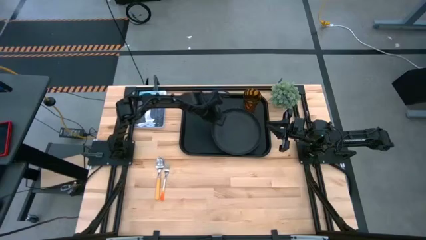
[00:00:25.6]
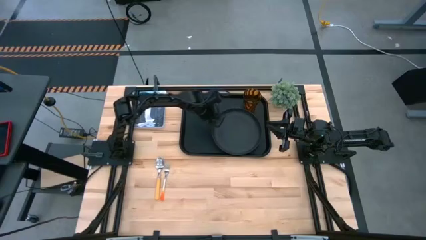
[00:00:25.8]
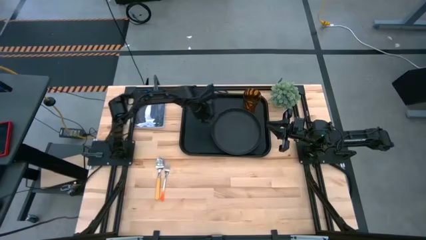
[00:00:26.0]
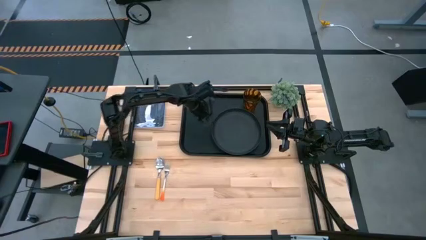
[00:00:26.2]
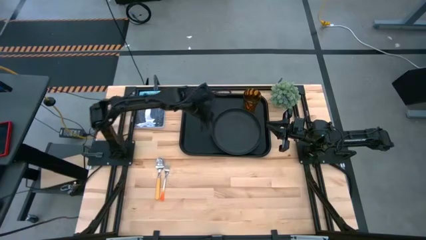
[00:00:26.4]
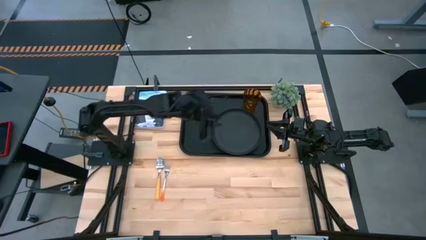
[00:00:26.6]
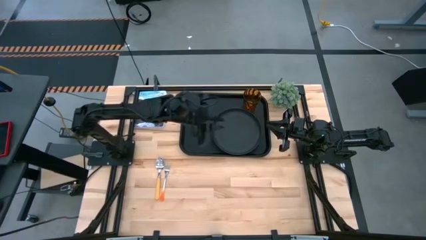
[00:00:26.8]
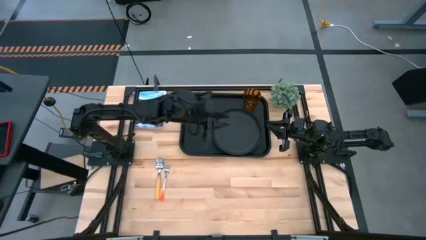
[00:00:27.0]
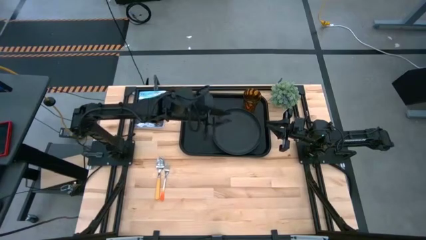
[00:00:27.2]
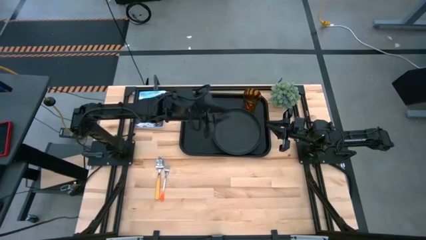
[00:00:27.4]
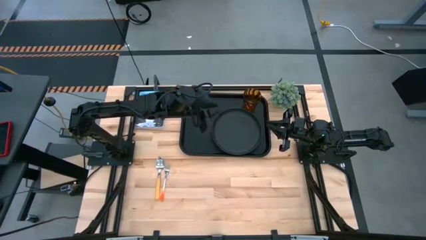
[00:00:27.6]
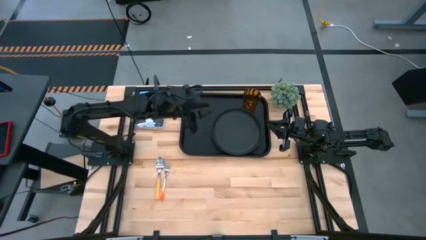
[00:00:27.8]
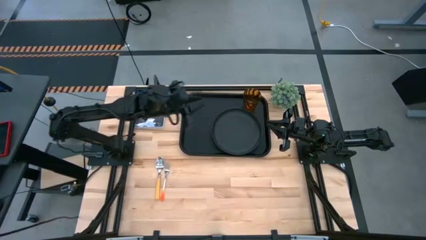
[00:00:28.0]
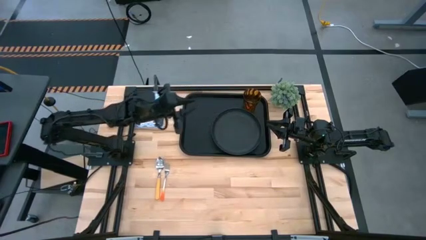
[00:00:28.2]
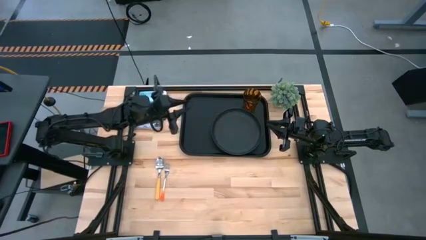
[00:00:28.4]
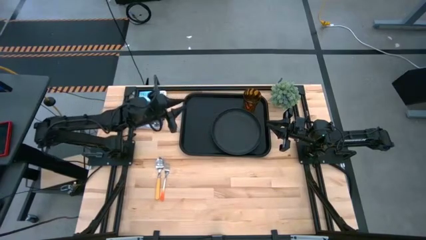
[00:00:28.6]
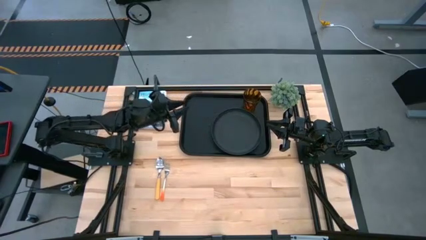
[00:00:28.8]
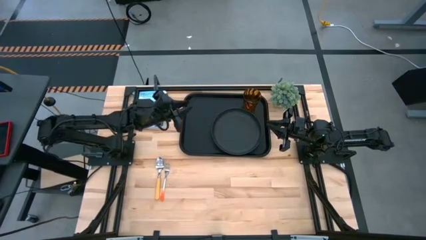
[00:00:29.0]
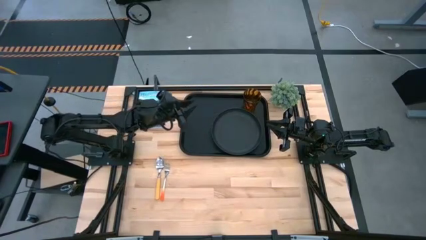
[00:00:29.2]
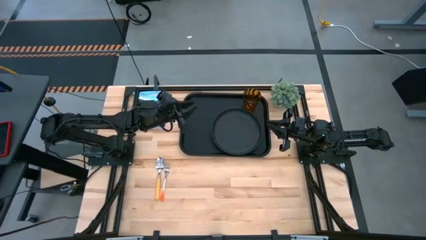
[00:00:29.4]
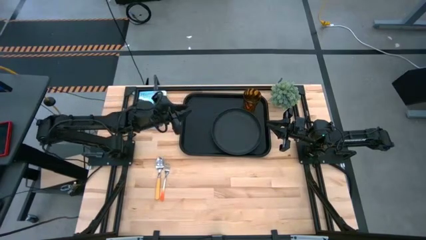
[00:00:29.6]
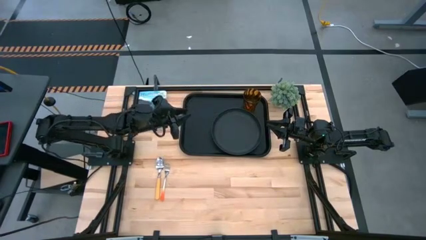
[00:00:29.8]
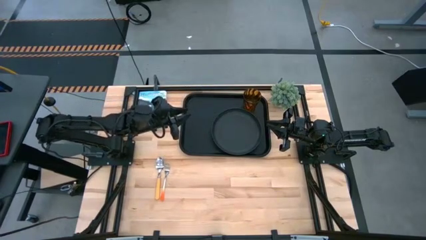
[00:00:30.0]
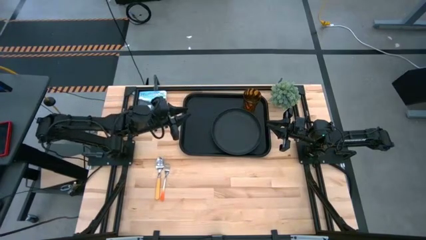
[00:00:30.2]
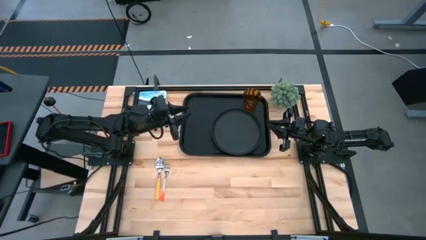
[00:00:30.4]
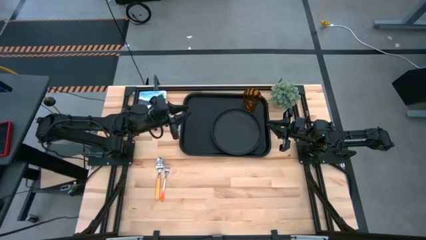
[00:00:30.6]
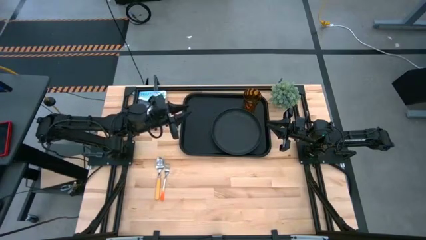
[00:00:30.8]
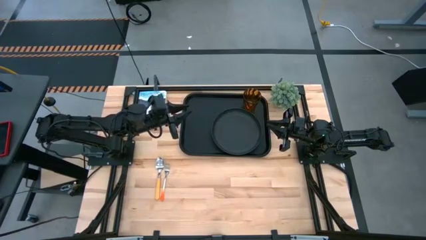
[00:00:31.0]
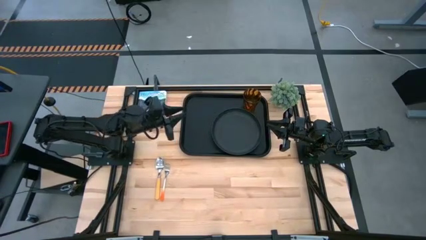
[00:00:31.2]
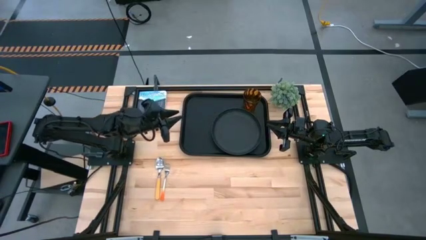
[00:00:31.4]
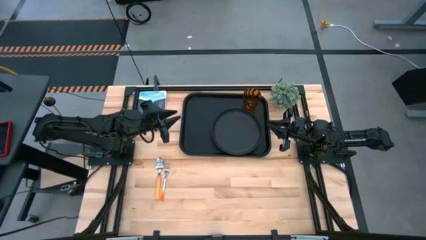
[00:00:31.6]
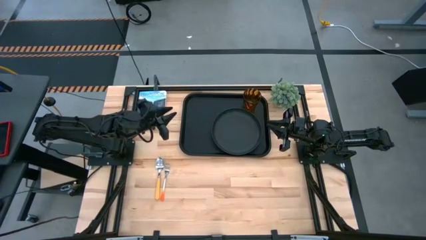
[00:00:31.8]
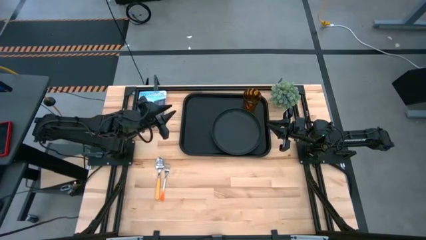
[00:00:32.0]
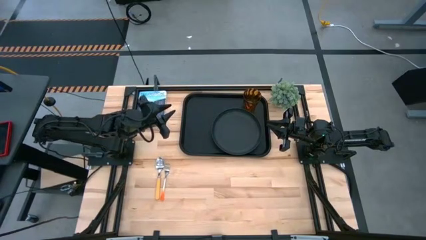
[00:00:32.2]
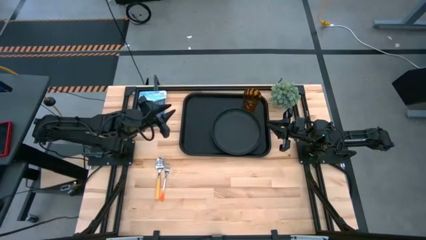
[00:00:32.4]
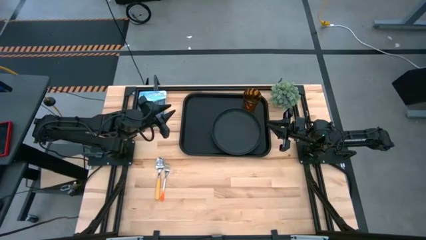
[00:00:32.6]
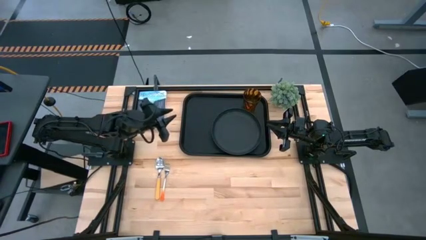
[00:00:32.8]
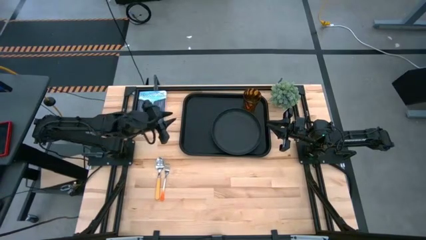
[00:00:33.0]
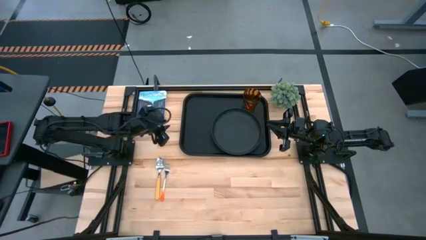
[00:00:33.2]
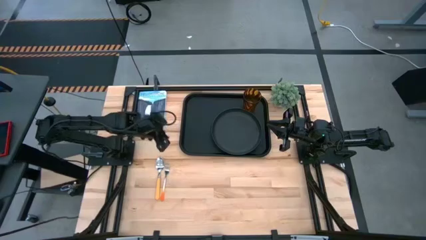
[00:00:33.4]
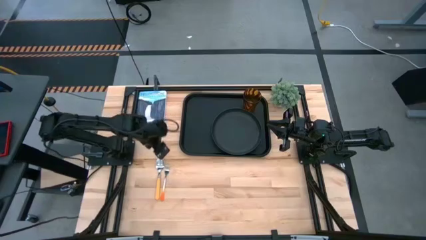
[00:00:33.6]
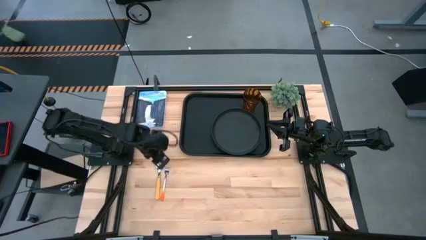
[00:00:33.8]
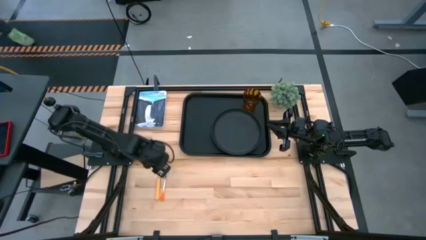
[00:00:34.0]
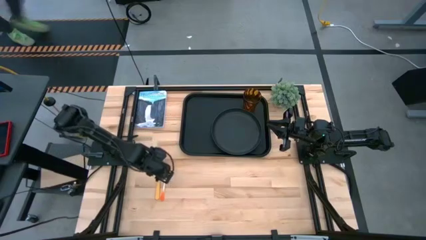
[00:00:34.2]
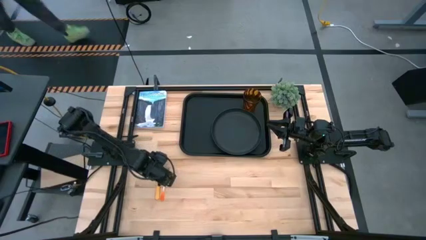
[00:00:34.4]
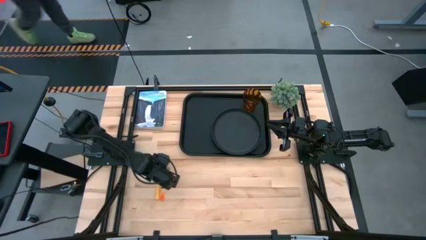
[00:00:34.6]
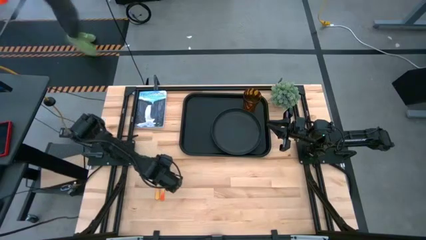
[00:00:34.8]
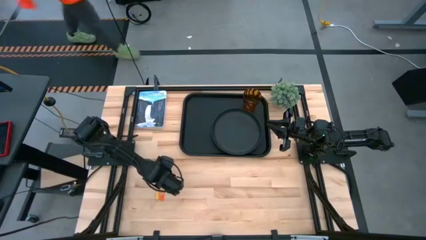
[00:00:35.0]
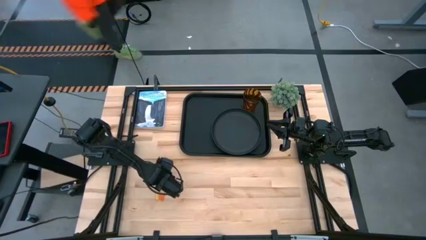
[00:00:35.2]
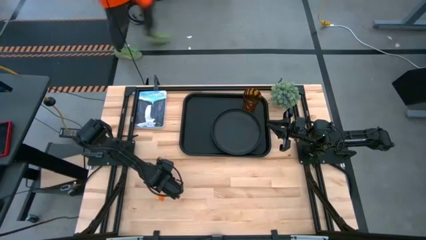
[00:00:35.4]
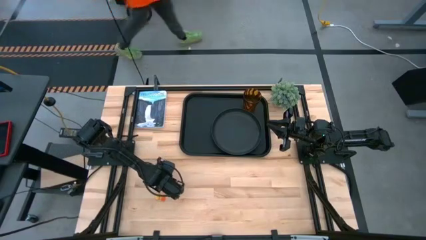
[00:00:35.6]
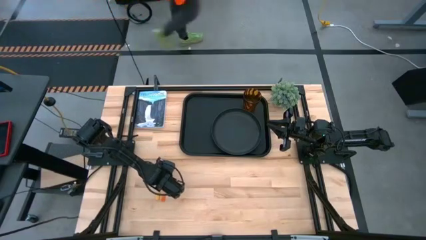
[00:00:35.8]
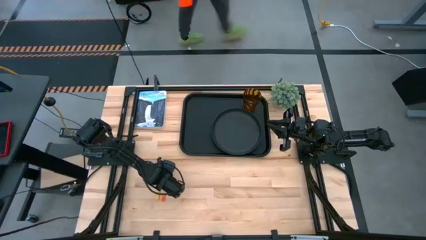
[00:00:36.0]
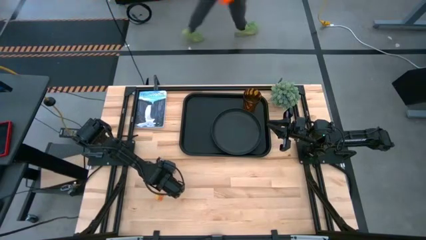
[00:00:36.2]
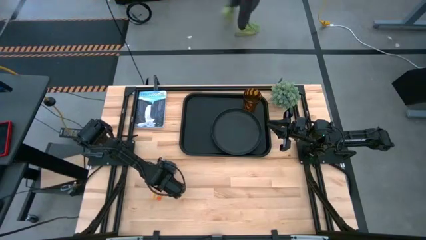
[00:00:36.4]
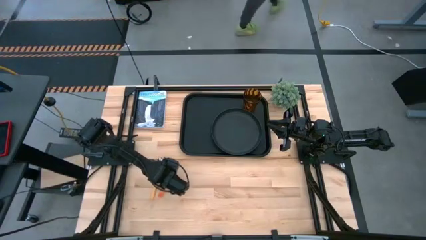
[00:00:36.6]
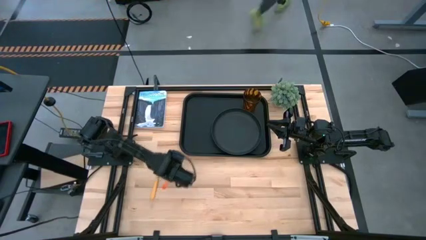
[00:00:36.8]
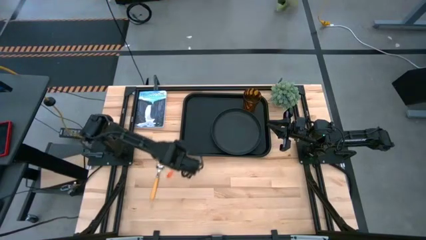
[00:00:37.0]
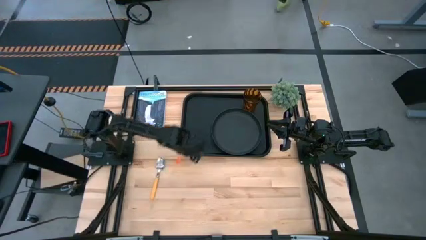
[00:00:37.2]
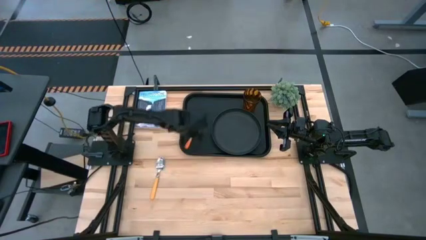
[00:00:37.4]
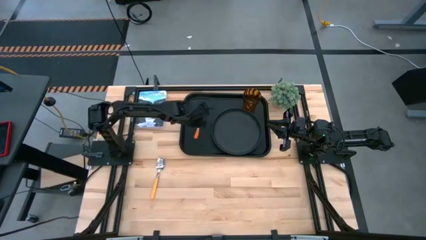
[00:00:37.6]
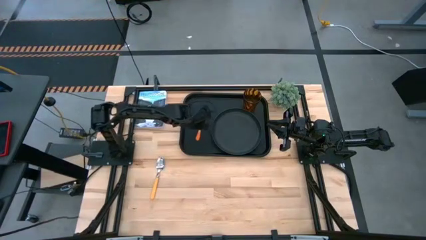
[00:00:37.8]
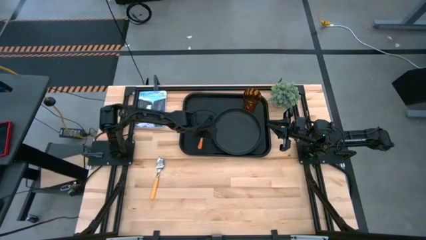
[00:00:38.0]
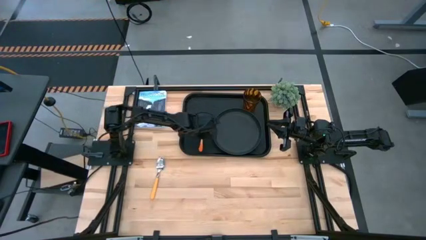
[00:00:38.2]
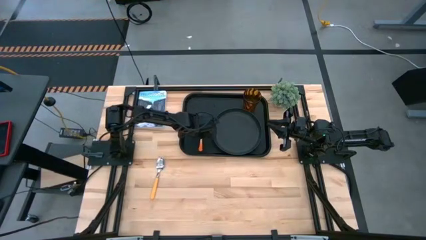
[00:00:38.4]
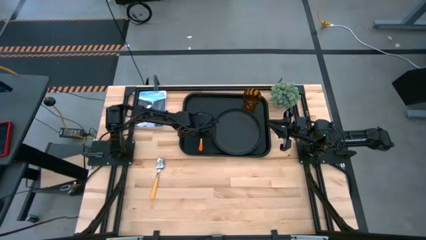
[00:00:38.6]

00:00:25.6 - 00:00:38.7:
Task: Pick and place plate/cup/fork/spoon on tray
Put the orange fork to the left of the black plate on the black tray
